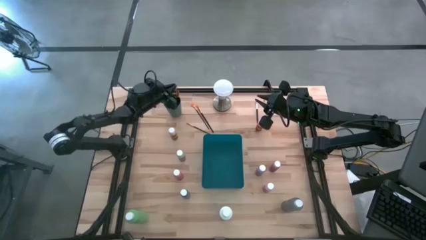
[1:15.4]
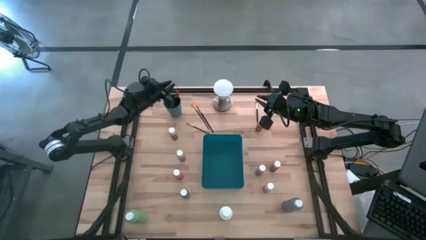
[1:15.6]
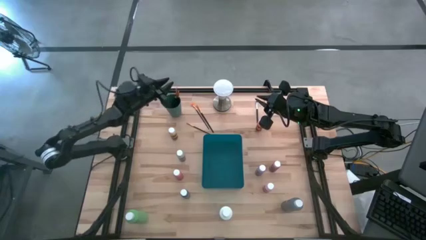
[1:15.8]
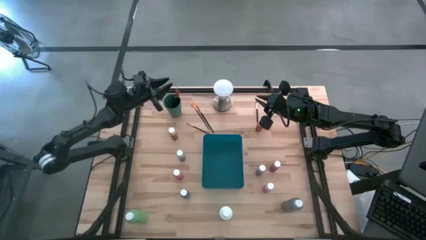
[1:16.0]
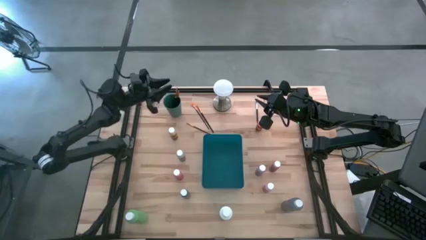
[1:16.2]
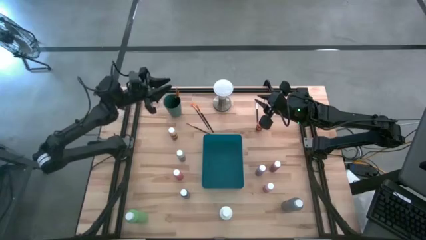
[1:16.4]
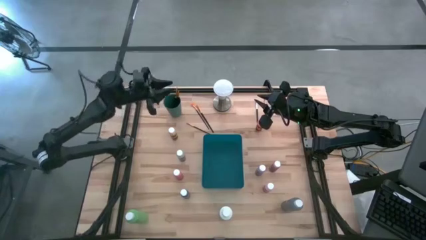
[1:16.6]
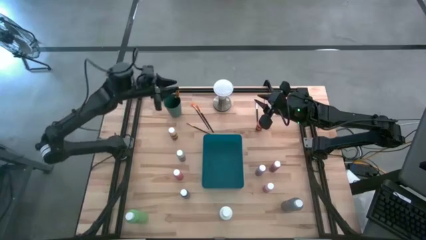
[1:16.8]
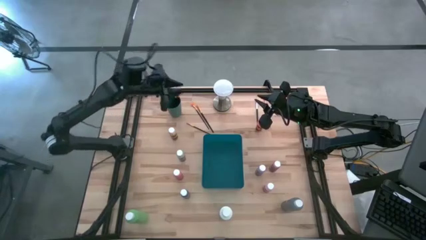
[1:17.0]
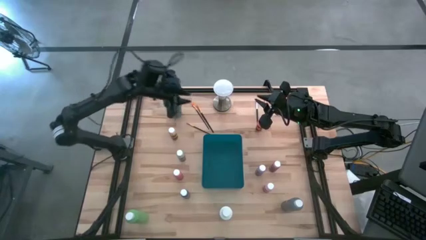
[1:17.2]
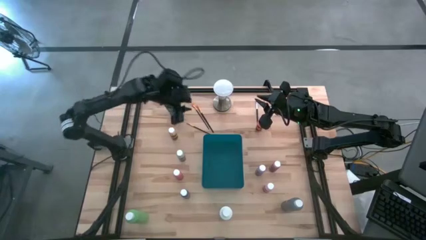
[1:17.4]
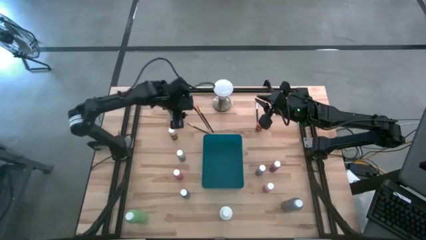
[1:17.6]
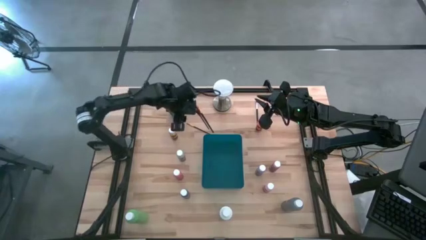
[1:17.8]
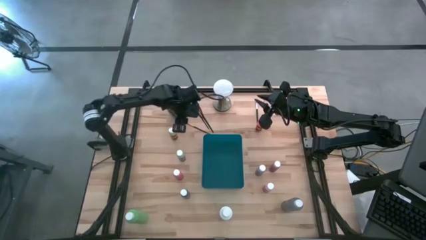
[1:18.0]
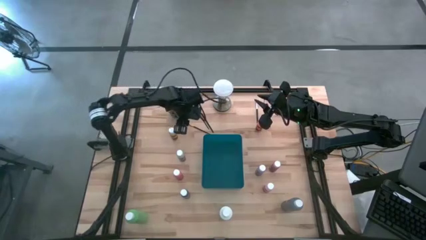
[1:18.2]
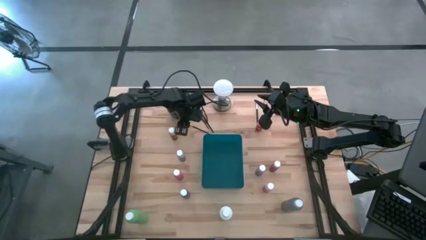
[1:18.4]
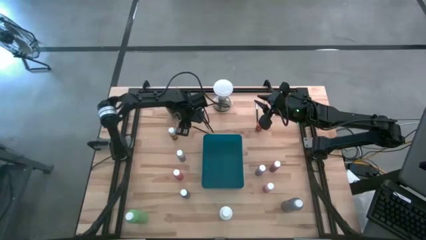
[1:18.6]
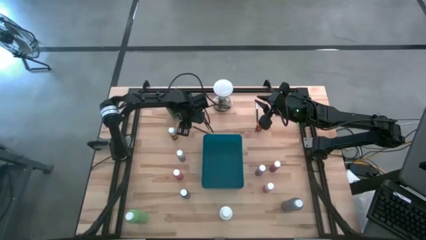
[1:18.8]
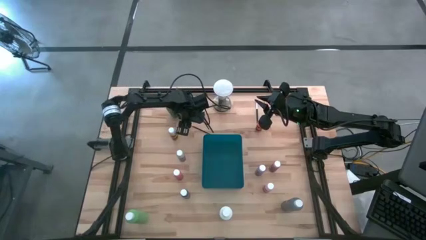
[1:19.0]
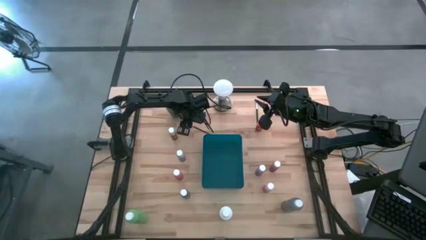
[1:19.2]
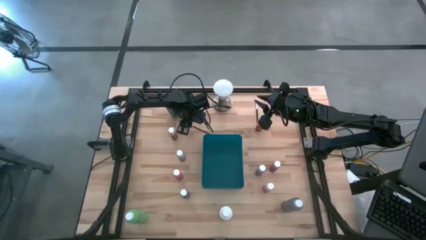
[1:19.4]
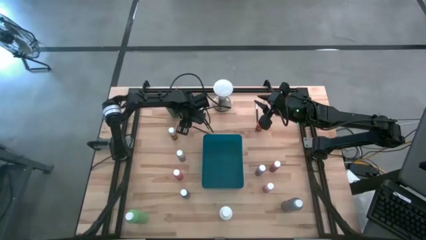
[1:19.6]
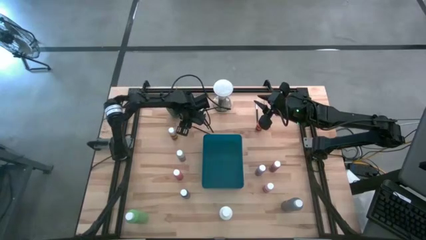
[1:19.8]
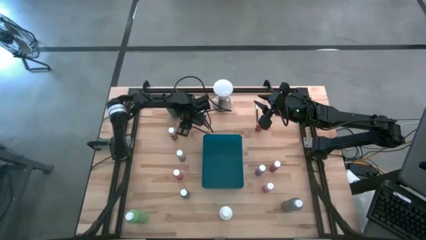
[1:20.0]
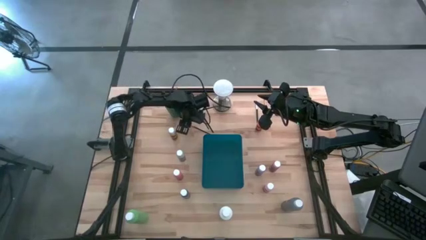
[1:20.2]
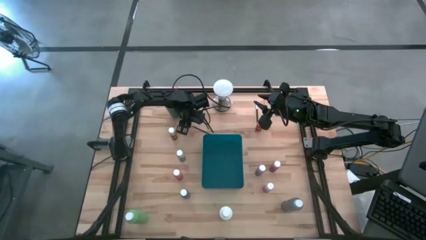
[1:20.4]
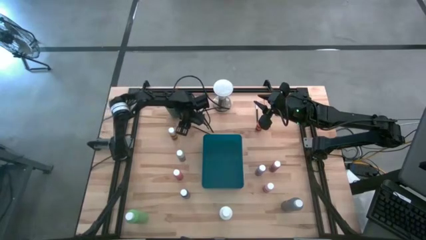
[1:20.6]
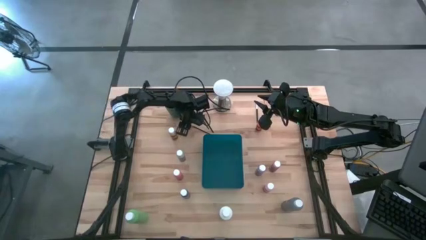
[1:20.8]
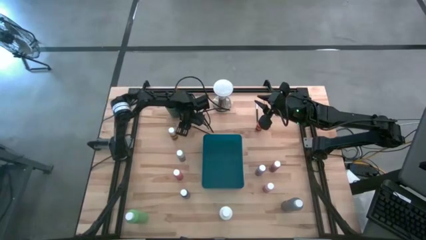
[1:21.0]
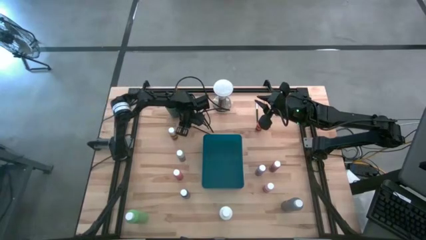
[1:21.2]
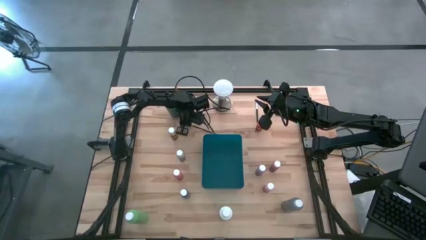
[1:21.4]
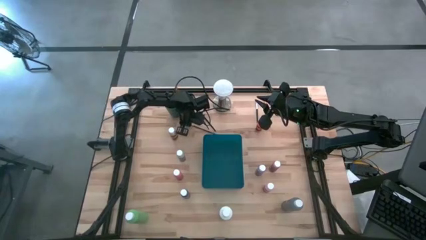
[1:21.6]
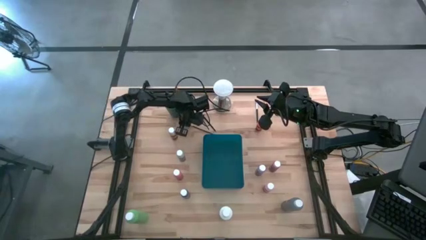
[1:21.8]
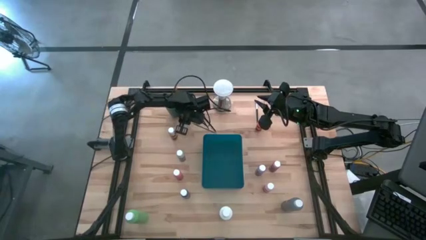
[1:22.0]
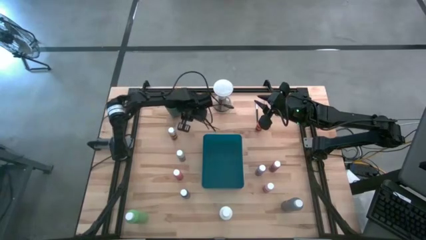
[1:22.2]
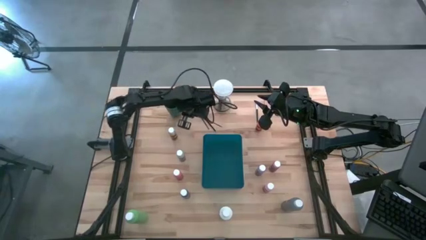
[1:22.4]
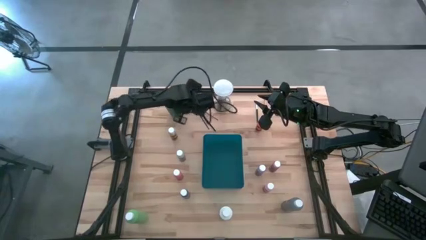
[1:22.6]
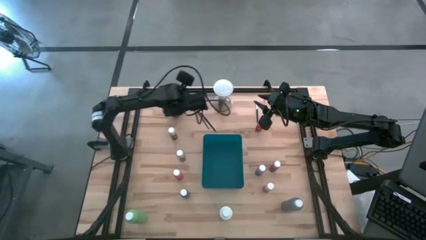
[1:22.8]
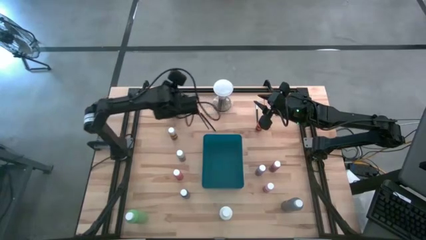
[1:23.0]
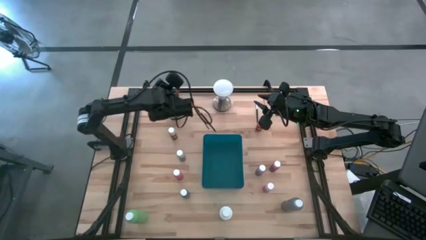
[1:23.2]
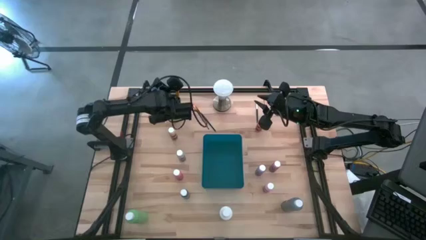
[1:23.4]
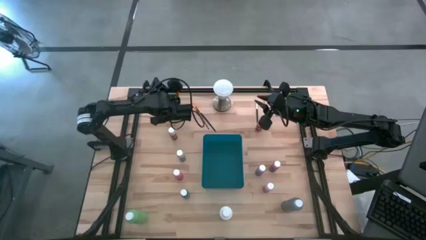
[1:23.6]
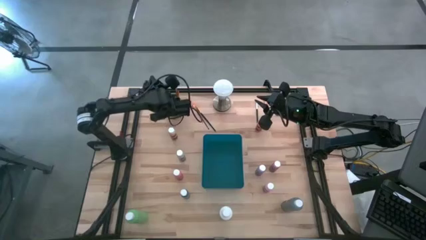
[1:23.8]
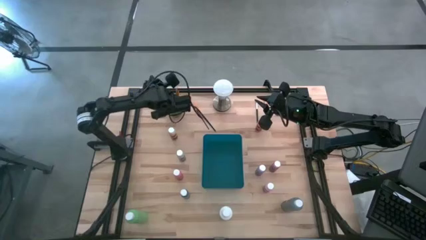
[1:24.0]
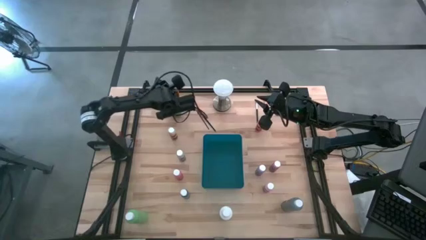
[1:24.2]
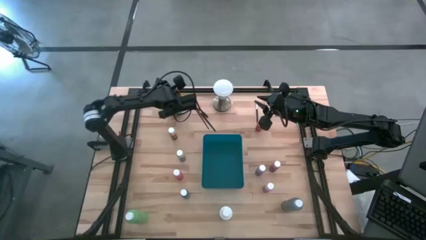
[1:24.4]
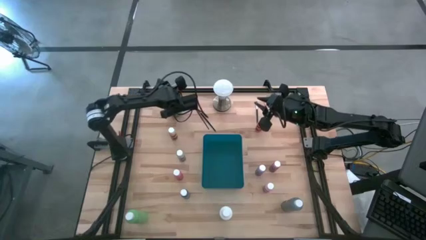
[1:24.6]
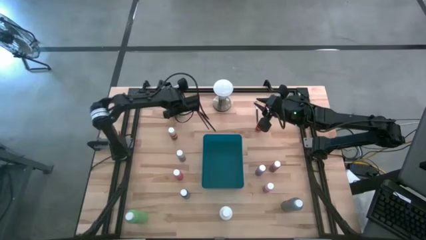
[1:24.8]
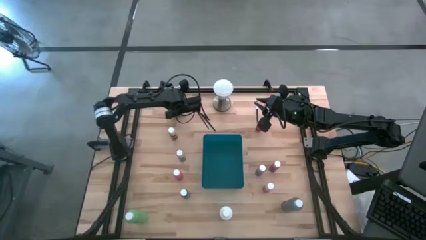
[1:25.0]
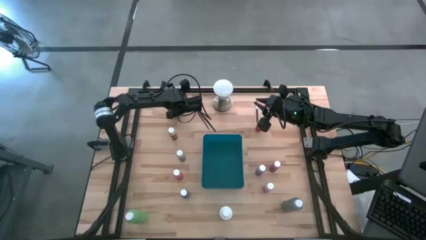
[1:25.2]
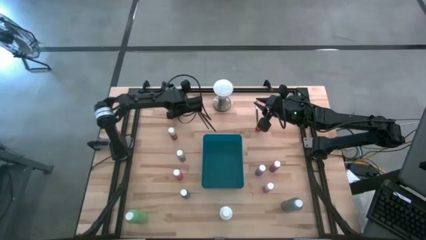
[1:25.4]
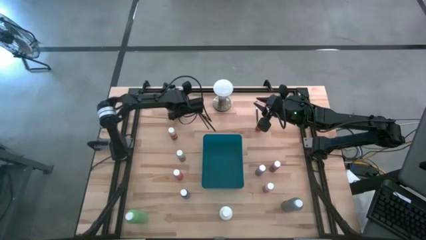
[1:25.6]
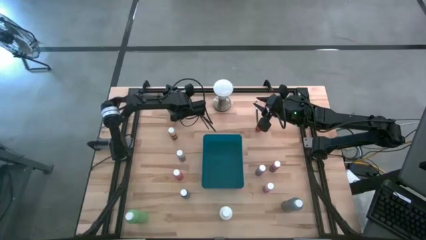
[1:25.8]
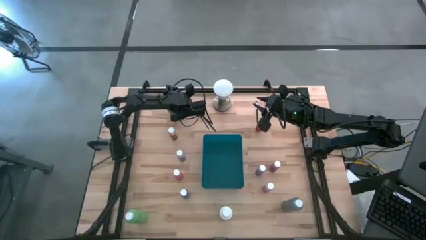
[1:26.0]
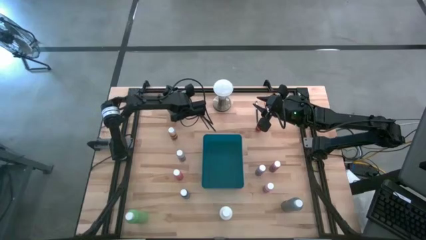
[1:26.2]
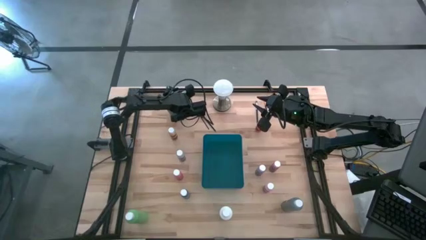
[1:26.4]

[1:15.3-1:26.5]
Task: Pick & Place Paint Supplies
Put the yellow paint brush into the green cup

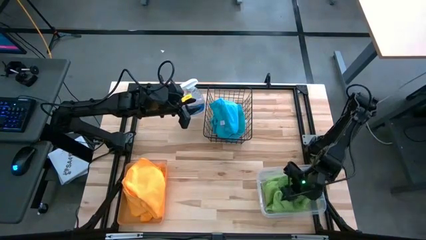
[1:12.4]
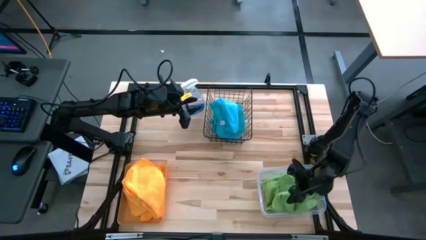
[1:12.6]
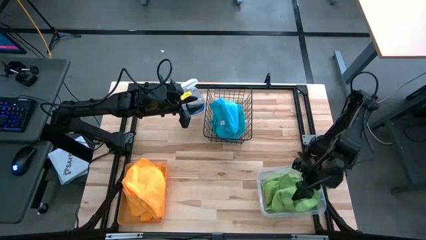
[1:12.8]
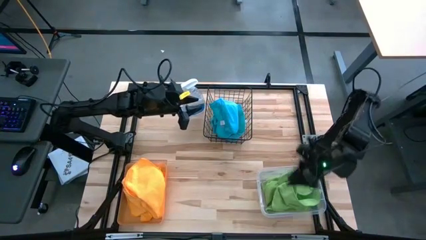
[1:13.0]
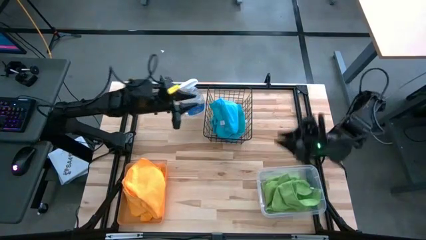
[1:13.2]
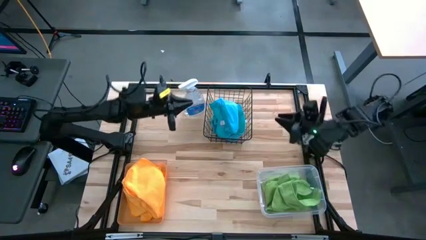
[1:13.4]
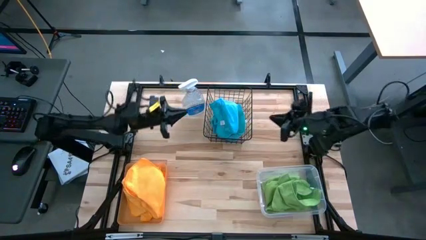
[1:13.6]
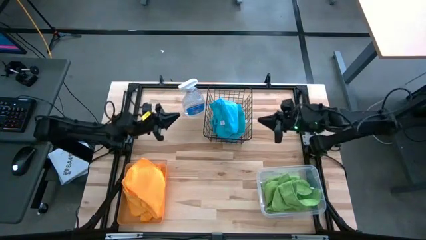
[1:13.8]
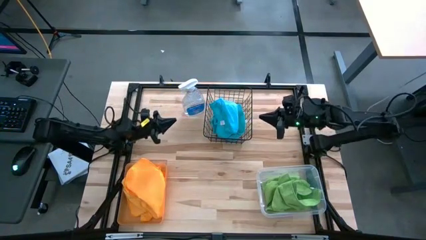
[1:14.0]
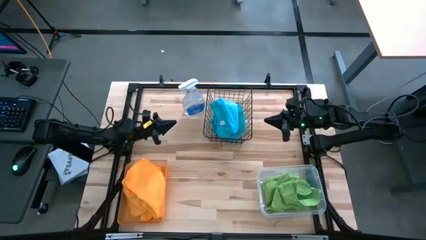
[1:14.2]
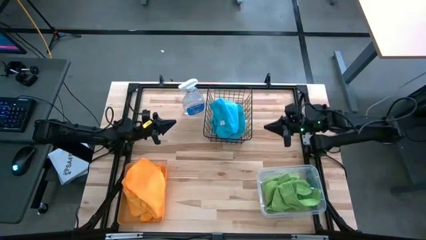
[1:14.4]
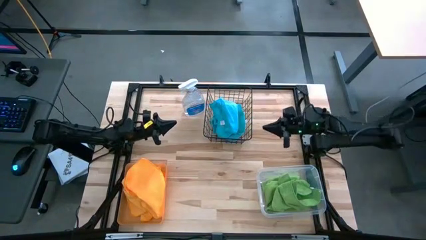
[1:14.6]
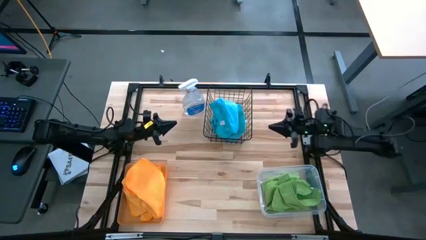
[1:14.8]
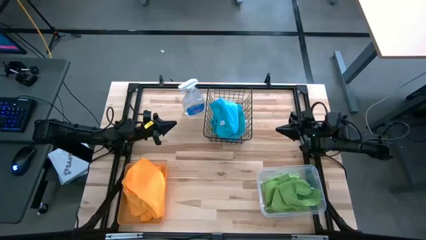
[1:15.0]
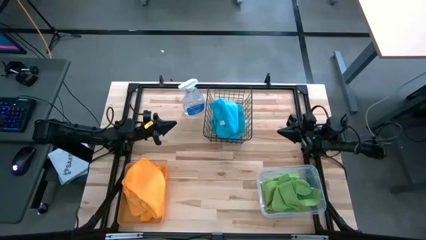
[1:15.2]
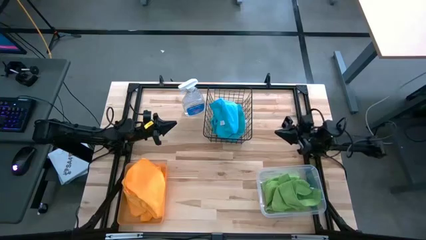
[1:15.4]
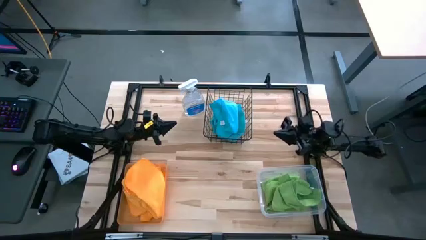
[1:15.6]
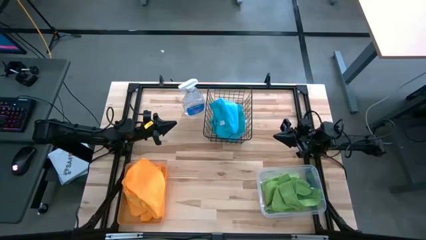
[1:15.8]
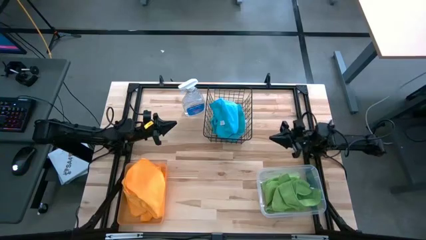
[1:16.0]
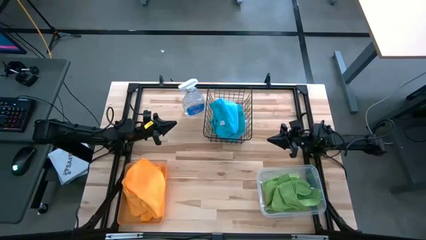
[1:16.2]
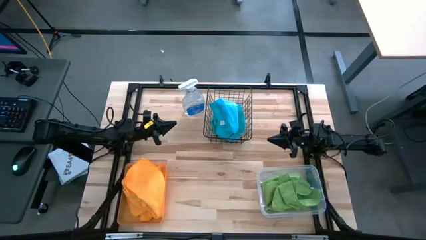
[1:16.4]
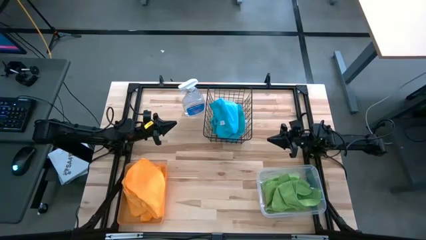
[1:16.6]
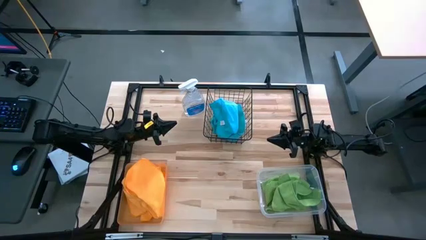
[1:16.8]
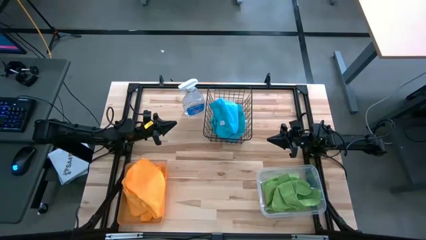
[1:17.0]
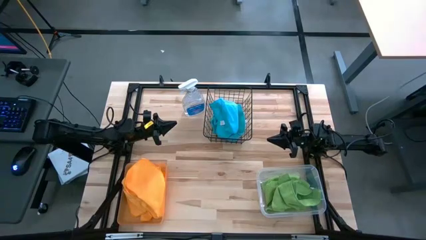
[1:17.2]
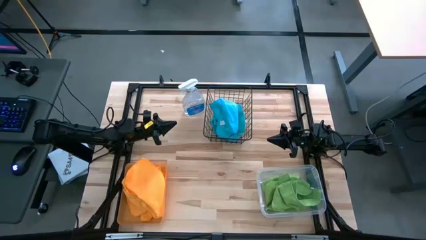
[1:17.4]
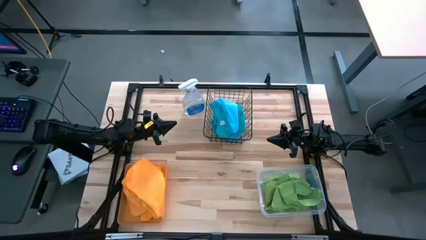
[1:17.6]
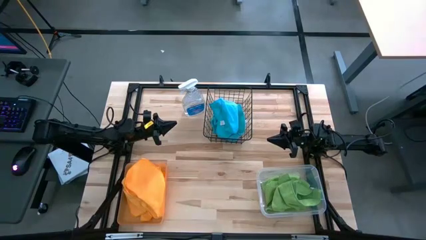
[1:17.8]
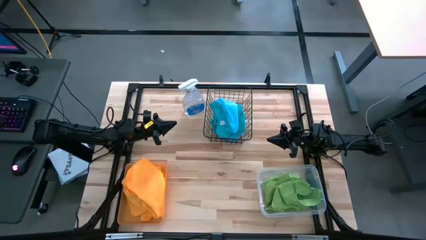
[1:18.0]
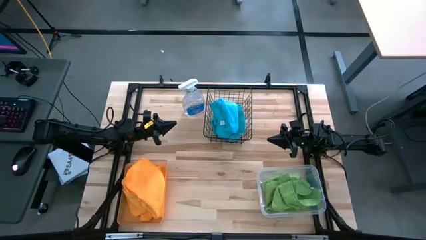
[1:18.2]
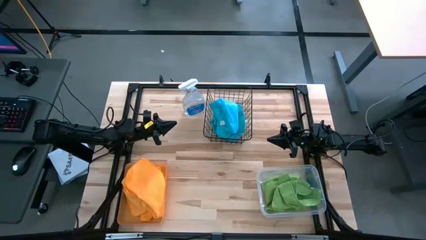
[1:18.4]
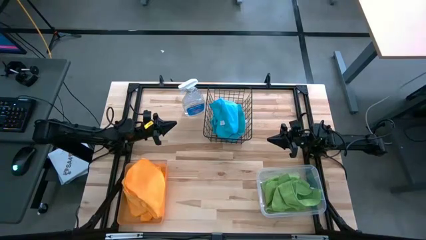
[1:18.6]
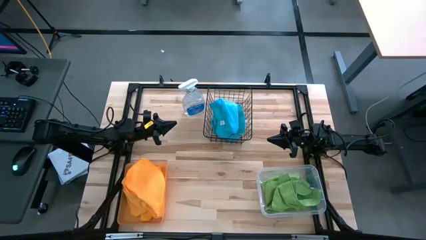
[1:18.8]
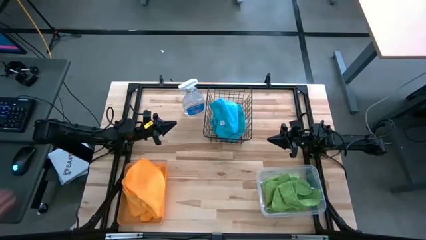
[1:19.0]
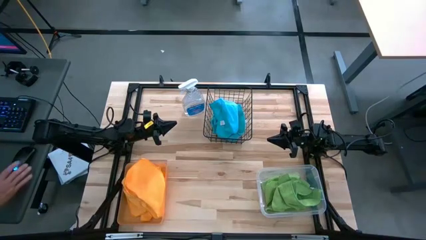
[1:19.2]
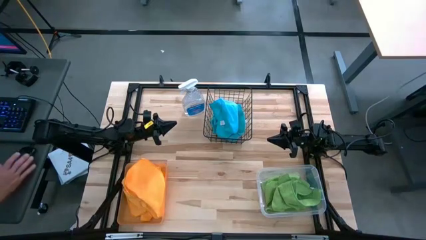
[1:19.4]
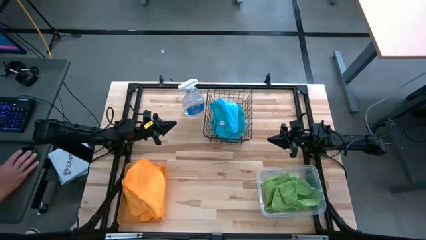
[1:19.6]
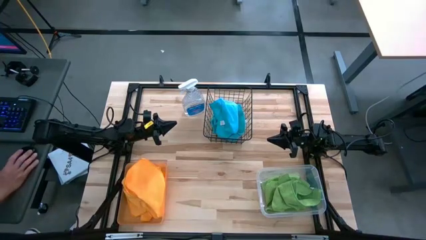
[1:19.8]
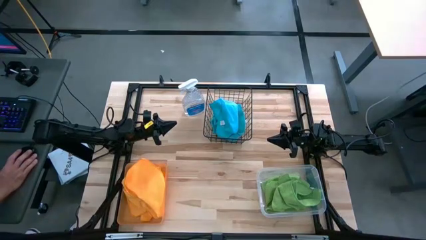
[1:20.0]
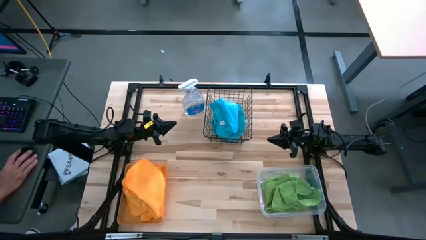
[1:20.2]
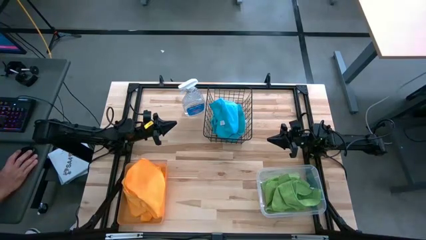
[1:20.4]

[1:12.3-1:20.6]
Task: Sort microfiber towel by color & place in baskets
Return to Home Position
